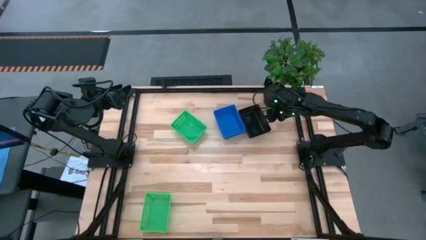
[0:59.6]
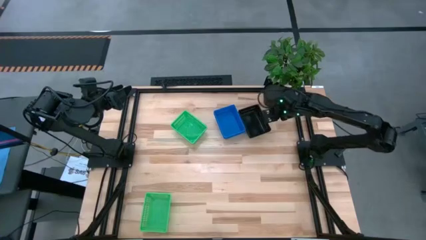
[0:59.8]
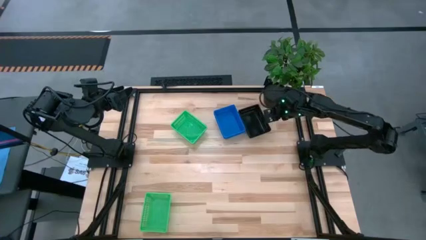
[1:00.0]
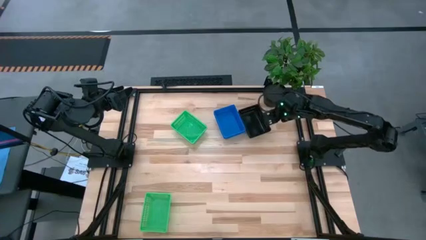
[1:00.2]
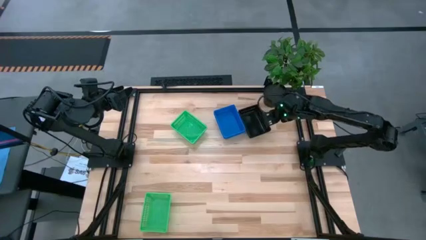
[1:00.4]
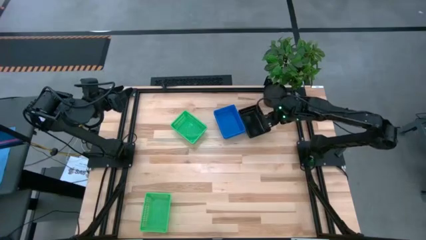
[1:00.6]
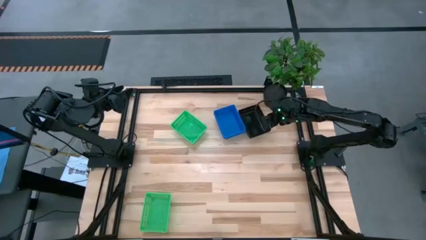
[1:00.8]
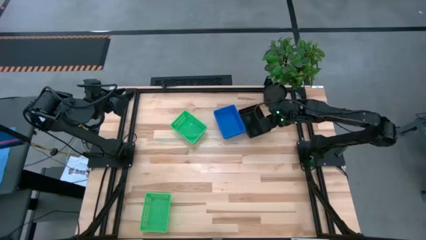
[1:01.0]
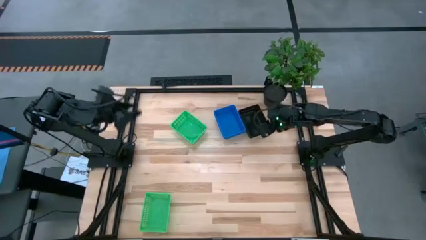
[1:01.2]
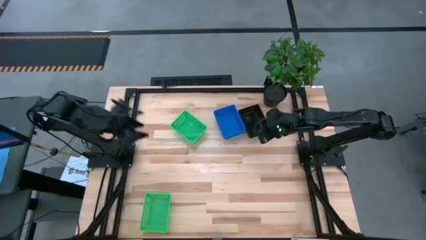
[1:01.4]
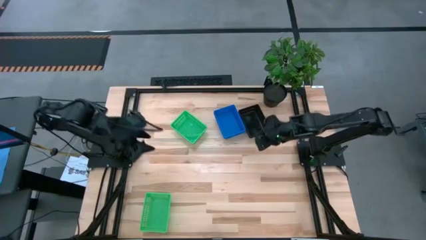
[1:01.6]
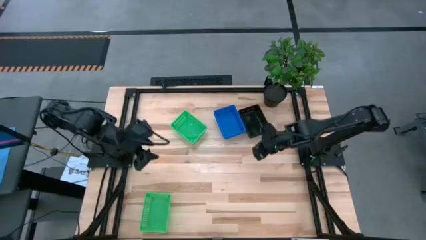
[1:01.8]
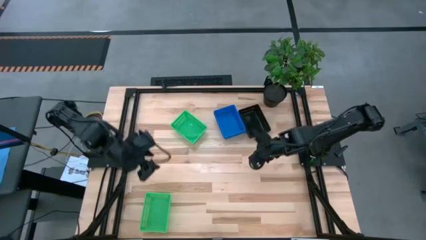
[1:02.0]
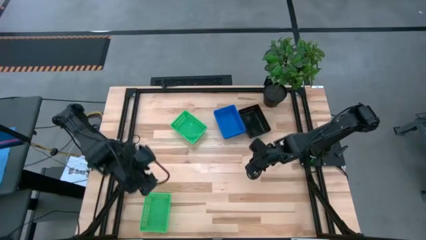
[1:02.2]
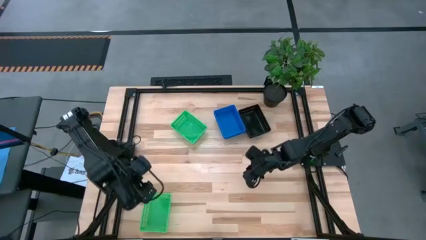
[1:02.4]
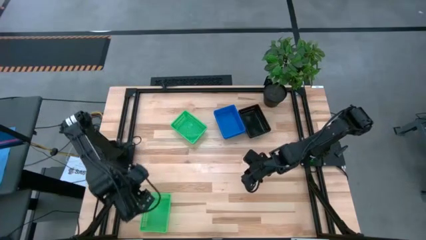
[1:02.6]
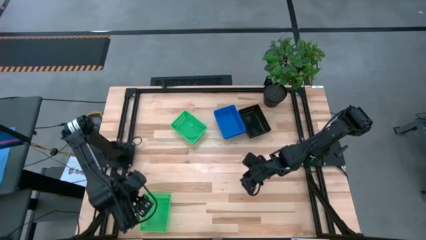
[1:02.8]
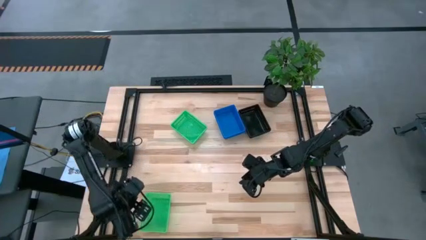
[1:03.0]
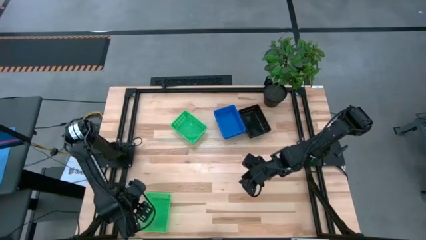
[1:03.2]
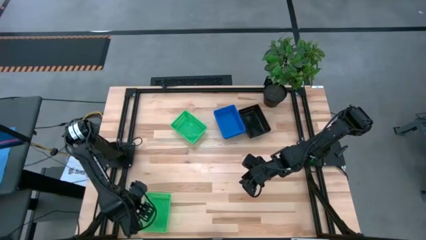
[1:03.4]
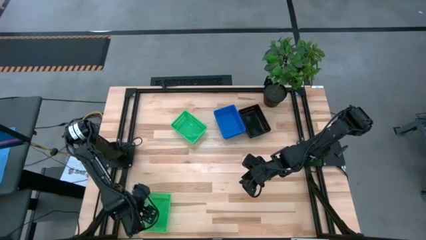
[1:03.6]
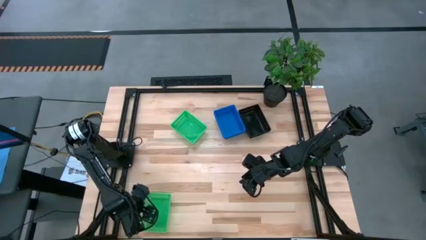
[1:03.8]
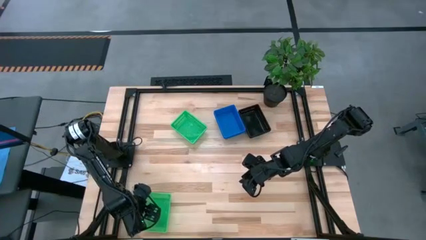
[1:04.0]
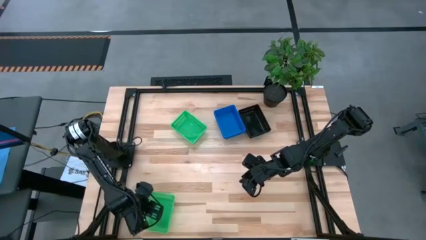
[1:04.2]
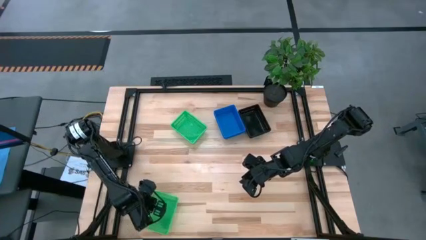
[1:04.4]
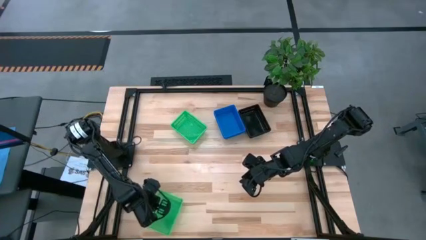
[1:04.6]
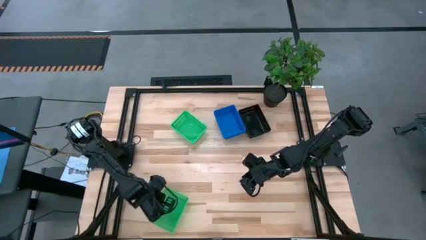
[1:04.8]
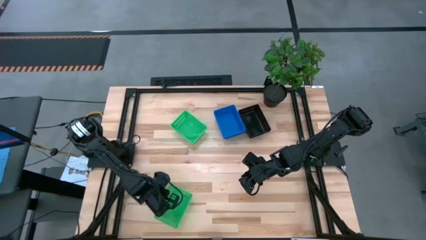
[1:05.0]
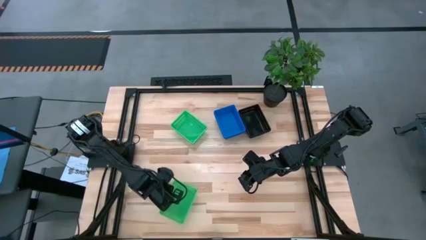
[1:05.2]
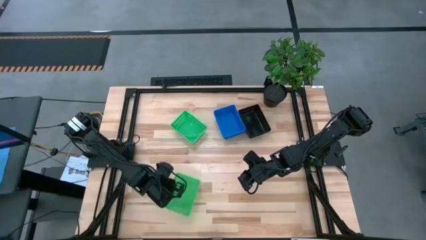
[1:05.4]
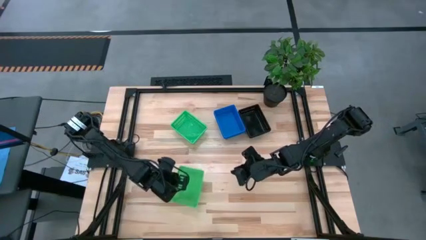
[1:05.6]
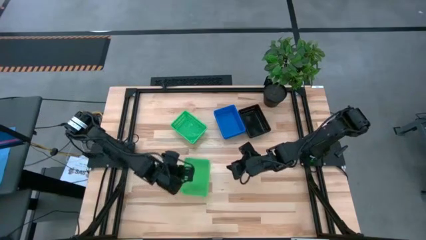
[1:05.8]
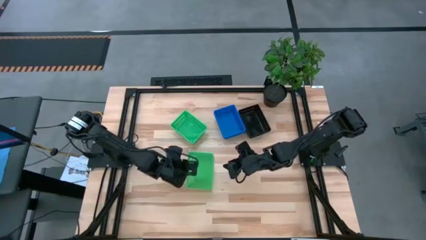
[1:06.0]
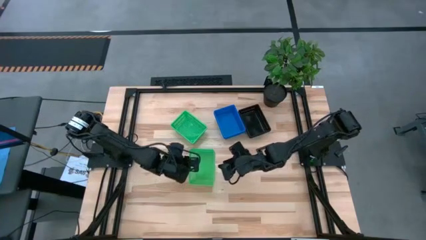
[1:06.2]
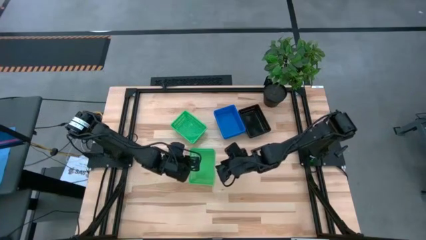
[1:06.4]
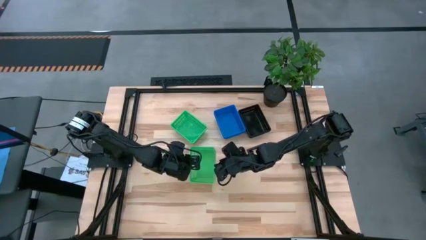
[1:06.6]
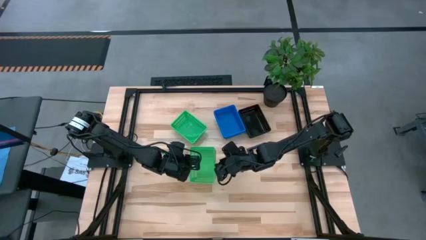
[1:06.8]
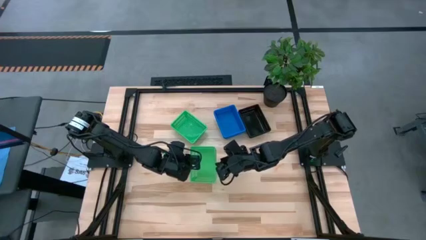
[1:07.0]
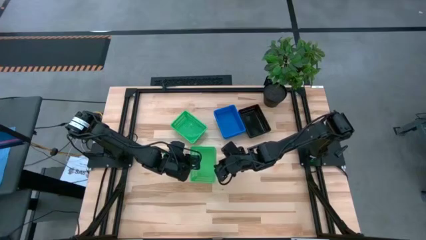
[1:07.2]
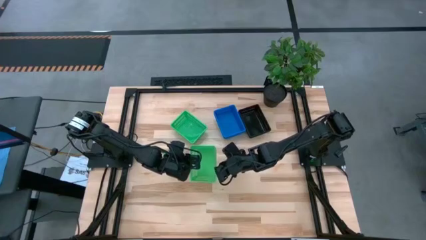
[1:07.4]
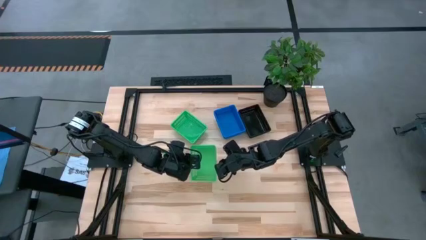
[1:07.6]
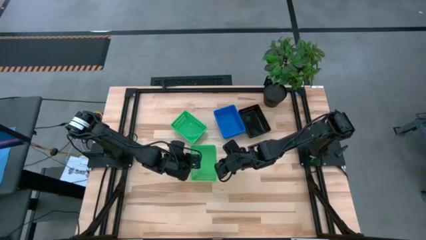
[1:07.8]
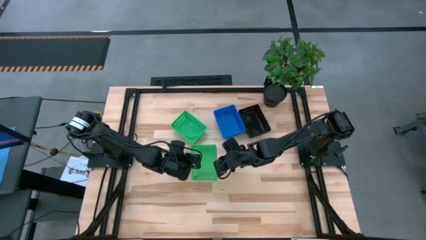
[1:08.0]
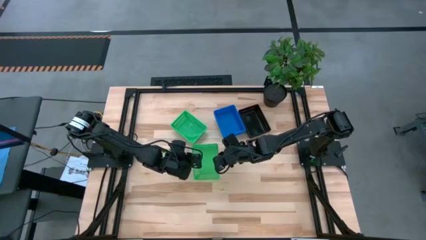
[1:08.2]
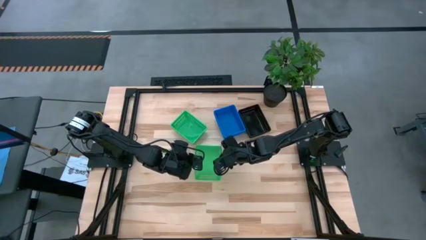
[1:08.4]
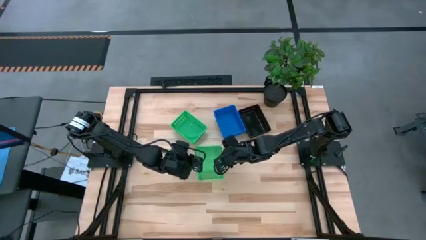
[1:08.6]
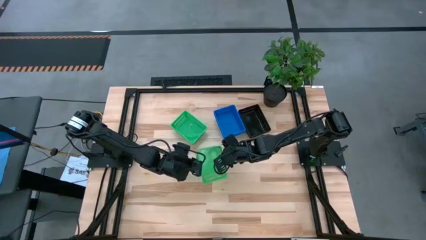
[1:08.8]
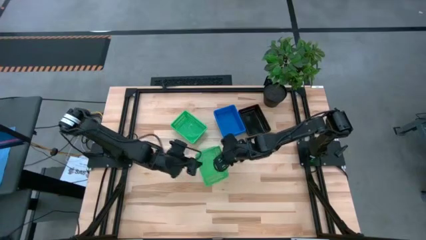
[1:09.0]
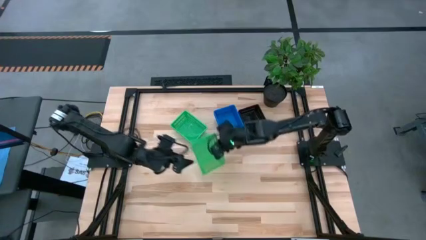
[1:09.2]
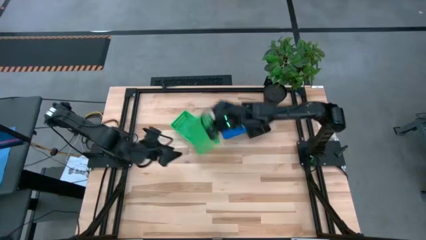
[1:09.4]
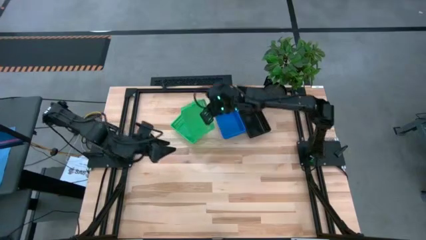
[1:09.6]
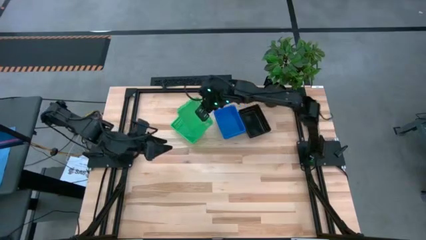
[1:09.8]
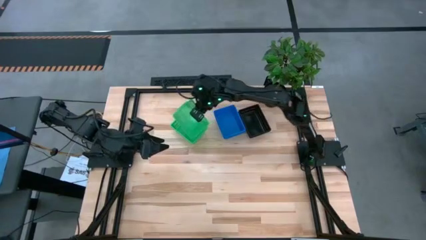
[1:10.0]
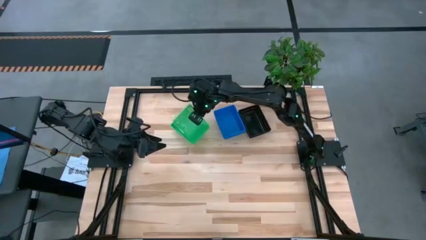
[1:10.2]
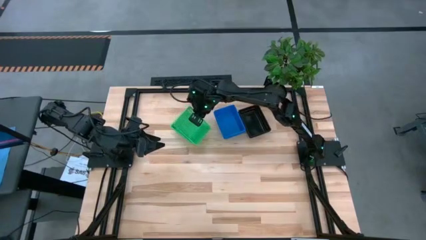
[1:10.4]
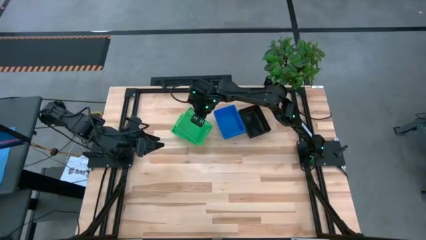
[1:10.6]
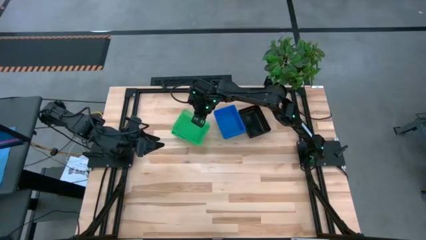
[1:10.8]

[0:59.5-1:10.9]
Stack the bottom green bin on top of the top green bins

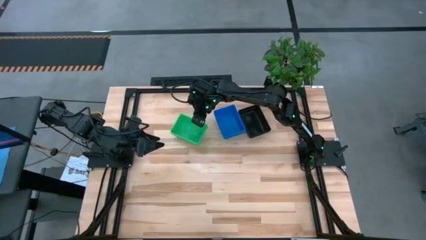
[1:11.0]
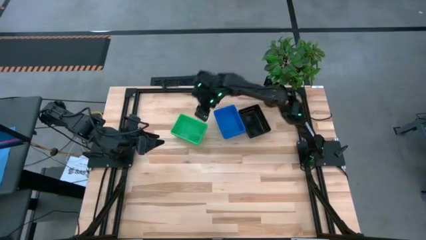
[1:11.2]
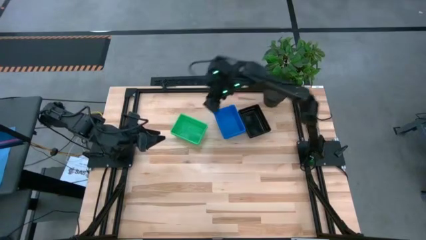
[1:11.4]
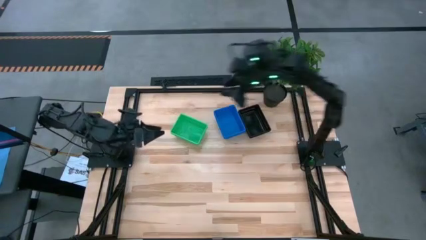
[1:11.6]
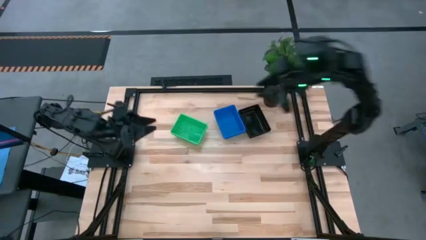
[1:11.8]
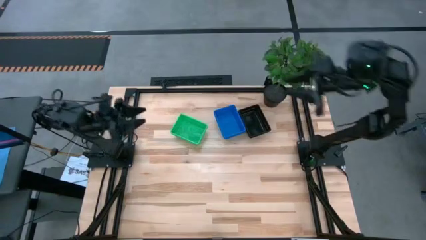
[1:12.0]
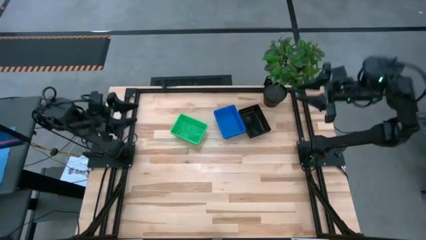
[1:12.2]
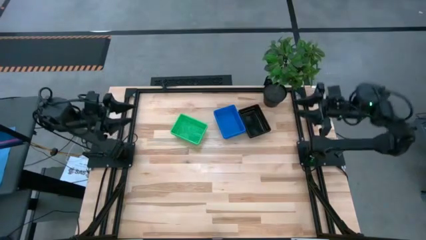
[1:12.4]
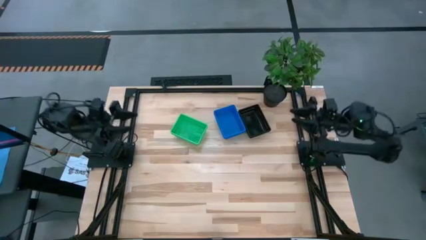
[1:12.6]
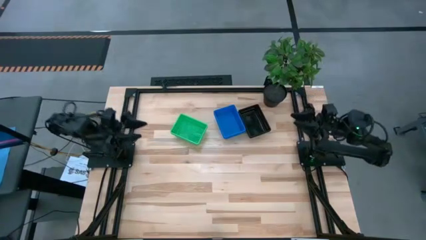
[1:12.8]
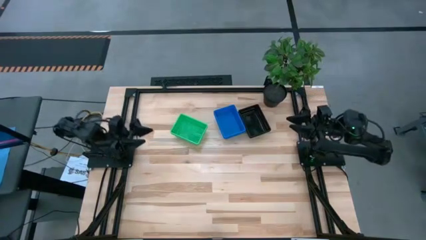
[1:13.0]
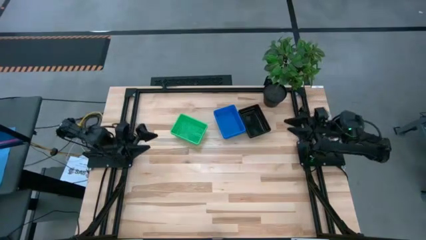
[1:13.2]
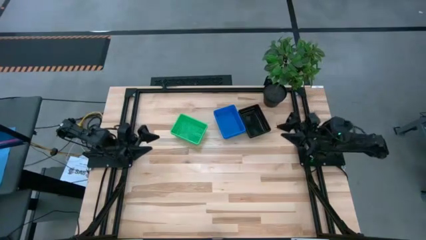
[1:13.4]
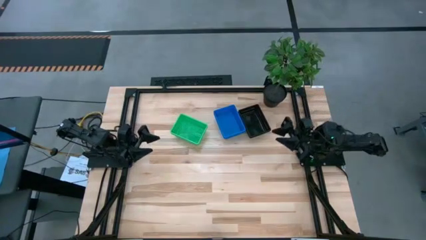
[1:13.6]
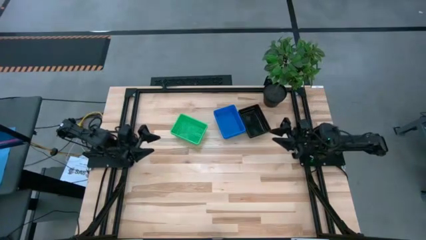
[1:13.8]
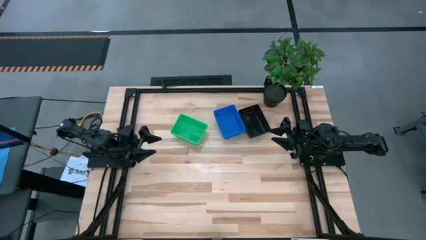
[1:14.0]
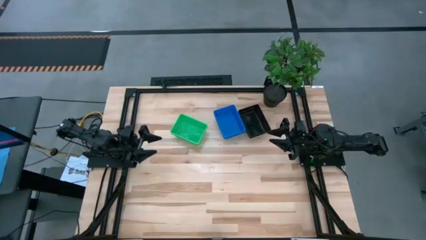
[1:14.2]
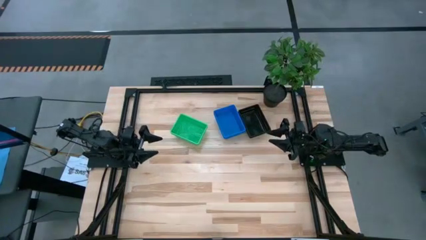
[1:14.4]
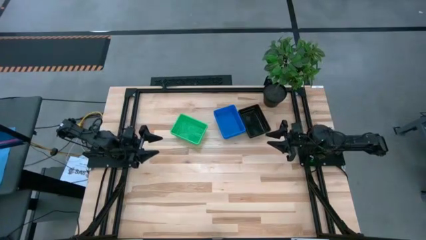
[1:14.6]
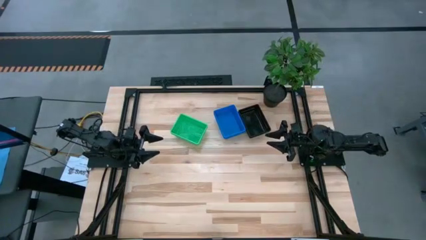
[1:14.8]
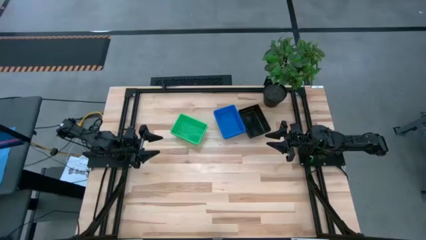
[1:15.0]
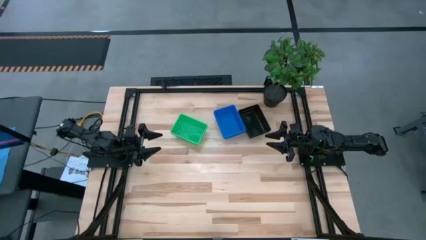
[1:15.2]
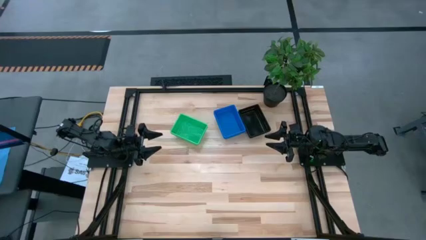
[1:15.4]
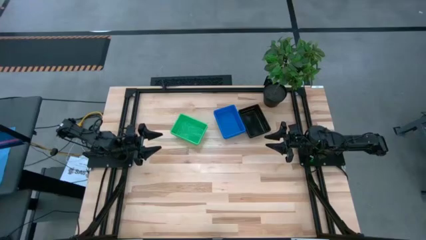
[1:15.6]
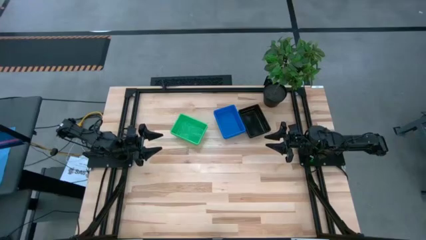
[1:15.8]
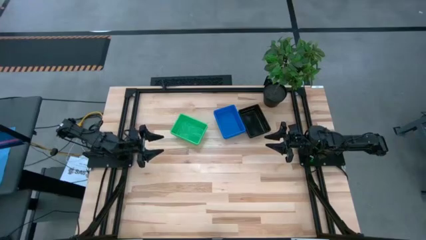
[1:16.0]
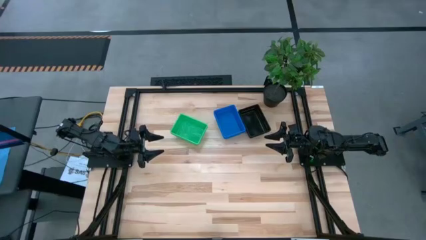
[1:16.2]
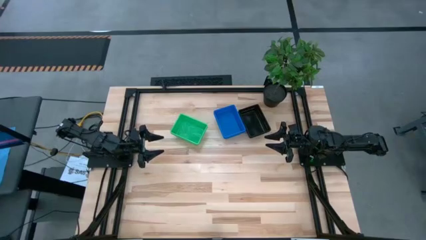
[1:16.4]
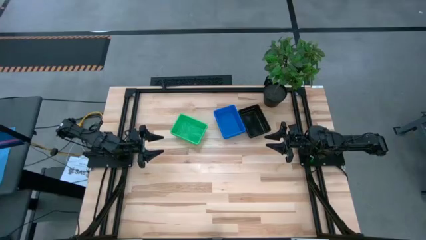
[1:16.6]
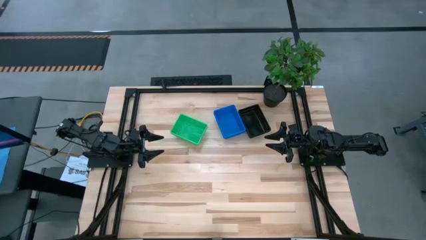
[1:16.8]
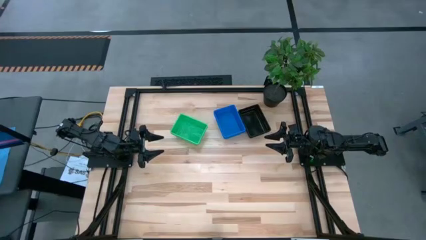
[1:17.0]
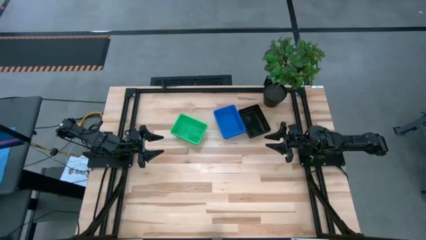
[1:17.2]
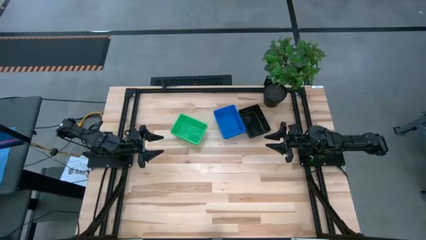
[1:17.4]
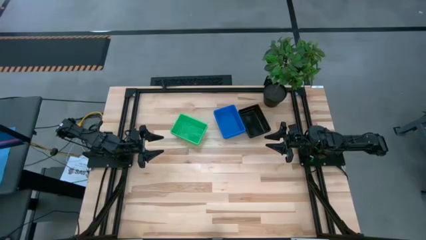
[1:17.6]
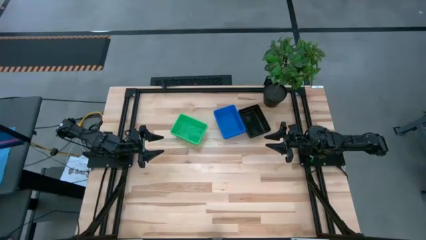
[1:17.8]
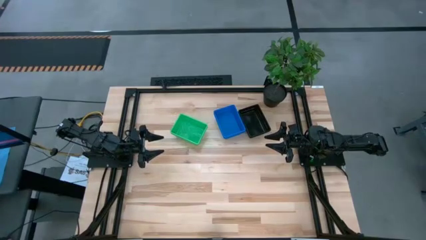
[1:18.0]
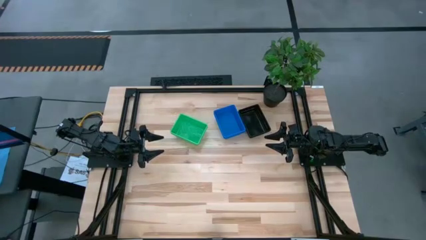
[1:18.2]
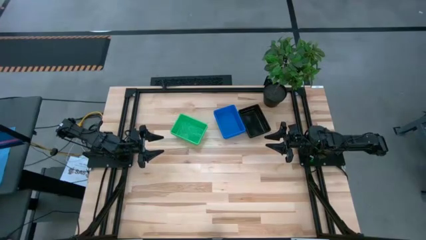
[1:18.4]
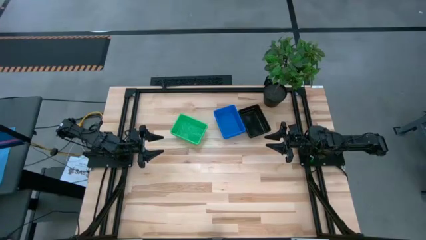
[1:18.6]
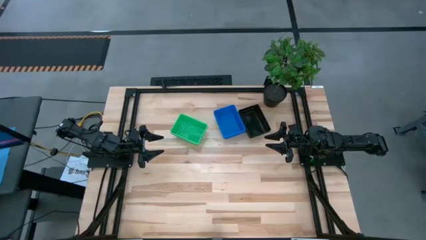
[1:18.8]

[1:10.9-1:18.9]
Return to Home Position
